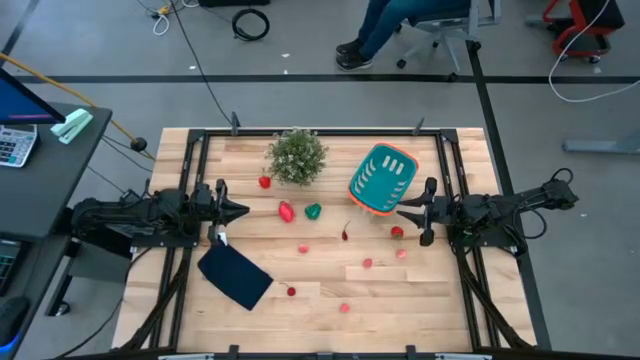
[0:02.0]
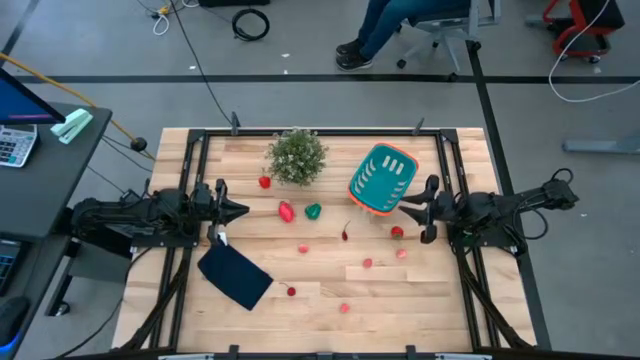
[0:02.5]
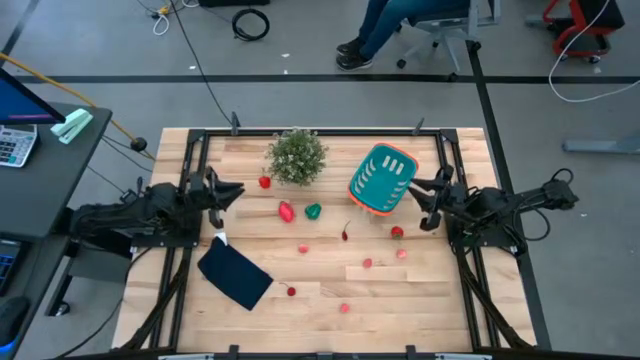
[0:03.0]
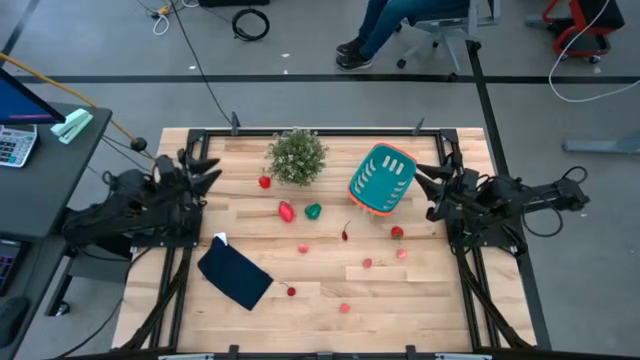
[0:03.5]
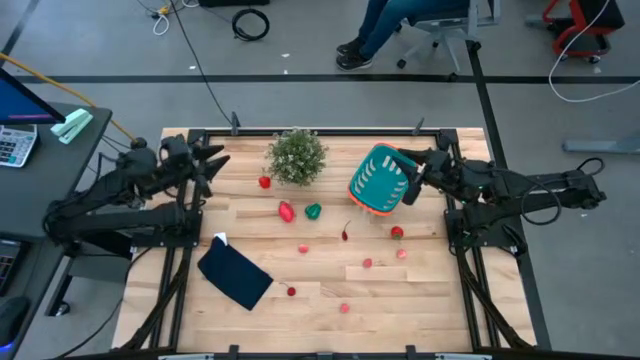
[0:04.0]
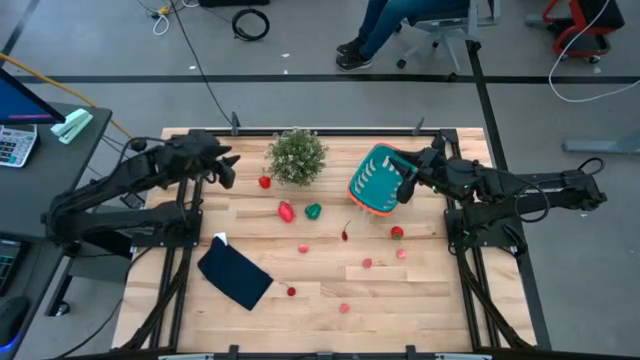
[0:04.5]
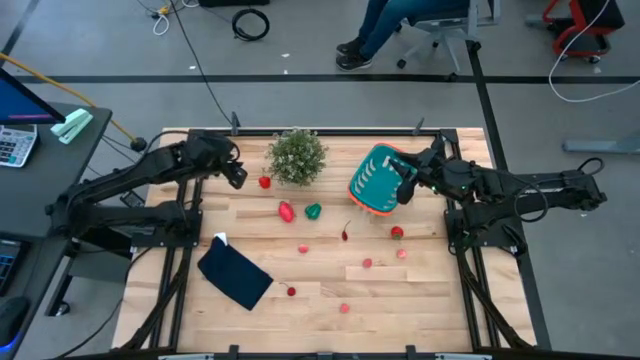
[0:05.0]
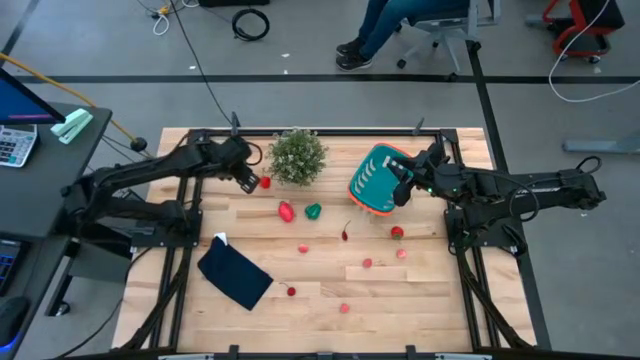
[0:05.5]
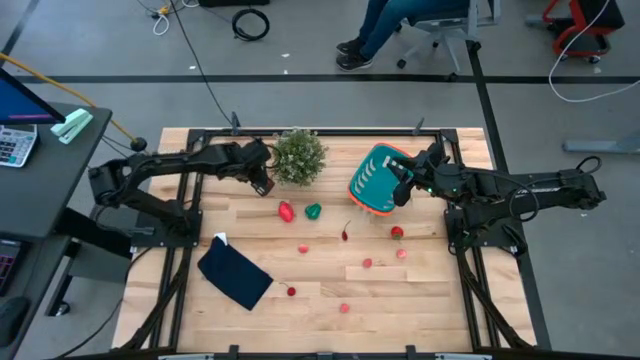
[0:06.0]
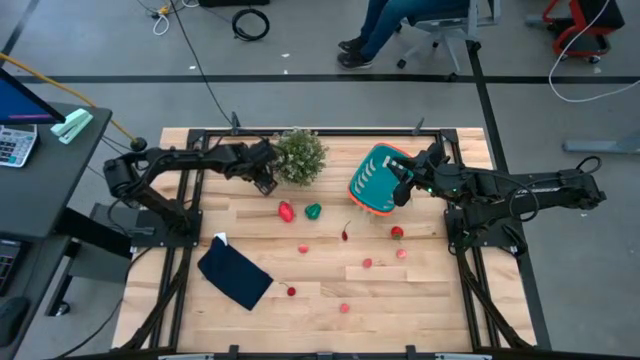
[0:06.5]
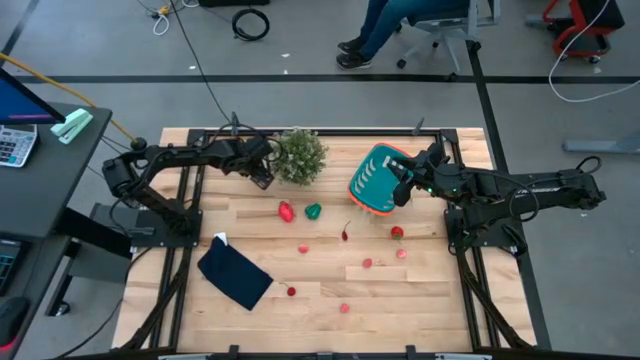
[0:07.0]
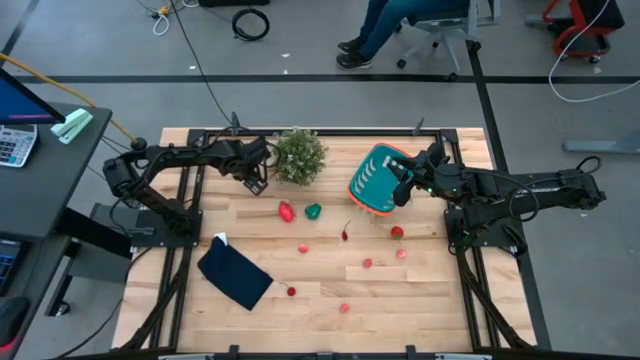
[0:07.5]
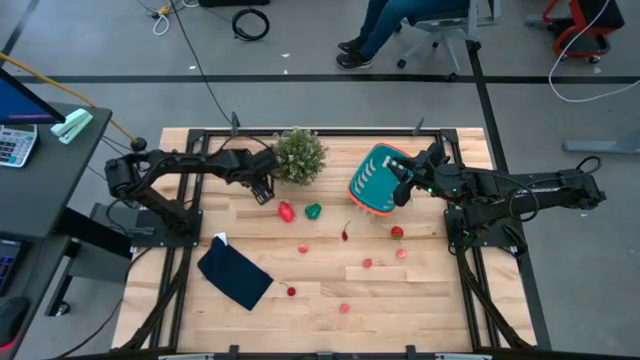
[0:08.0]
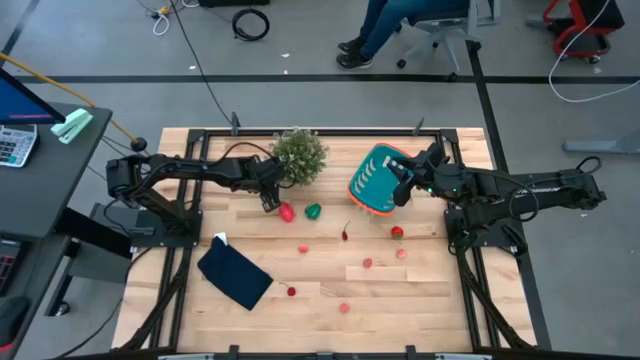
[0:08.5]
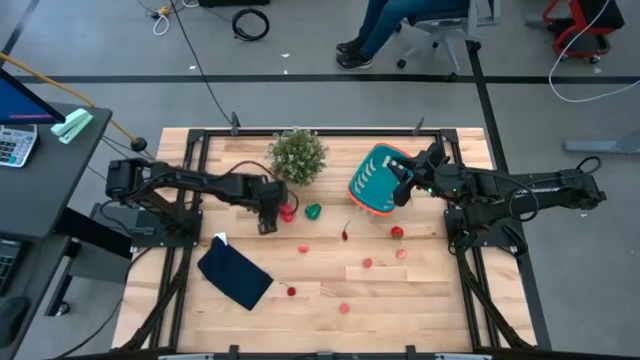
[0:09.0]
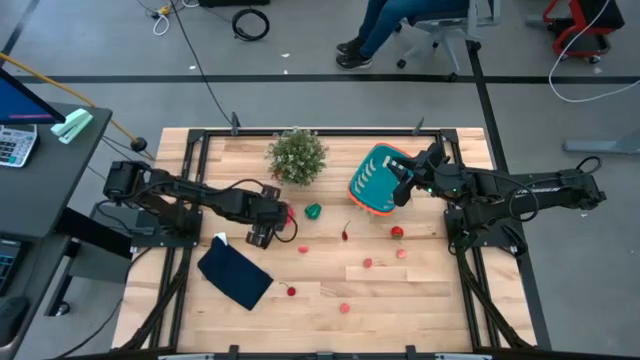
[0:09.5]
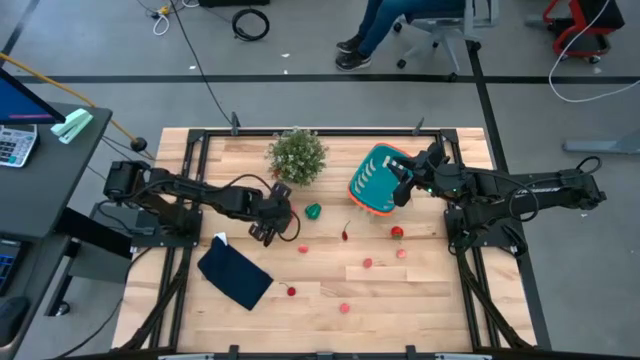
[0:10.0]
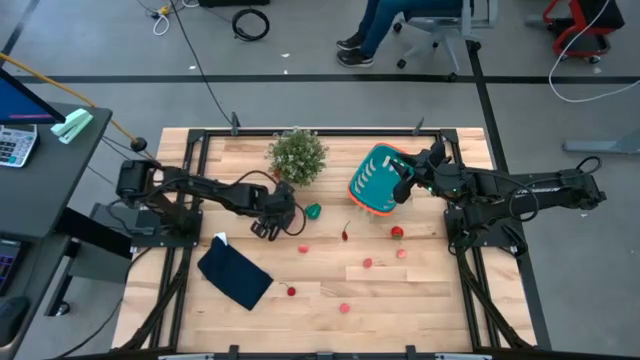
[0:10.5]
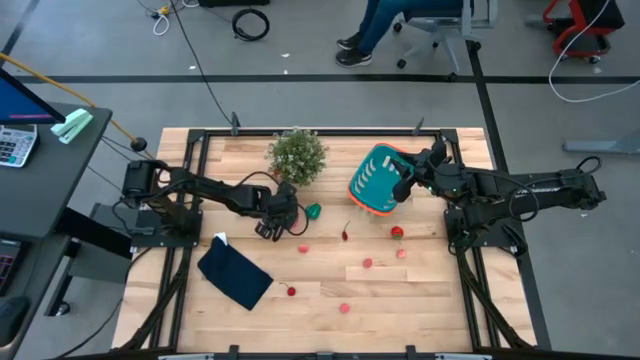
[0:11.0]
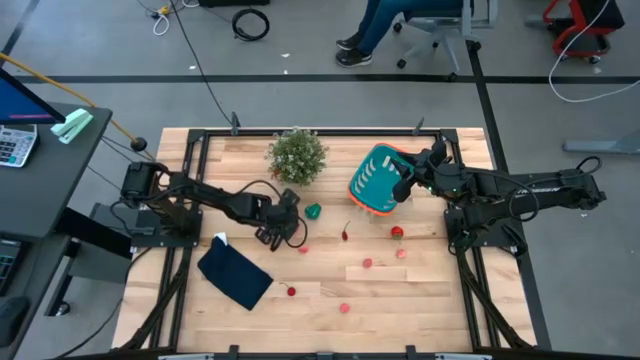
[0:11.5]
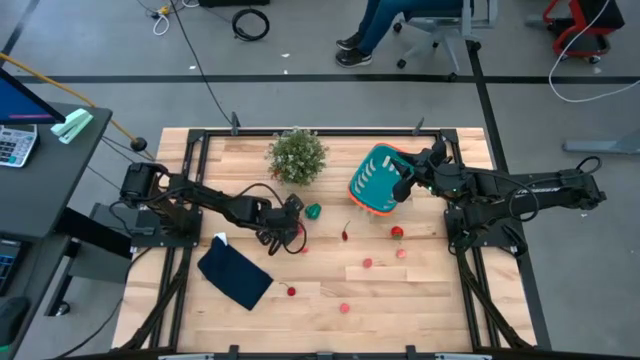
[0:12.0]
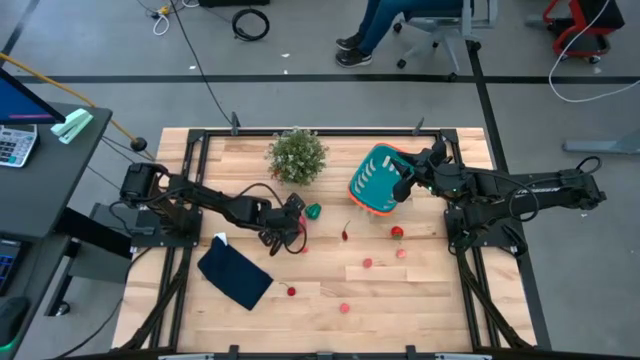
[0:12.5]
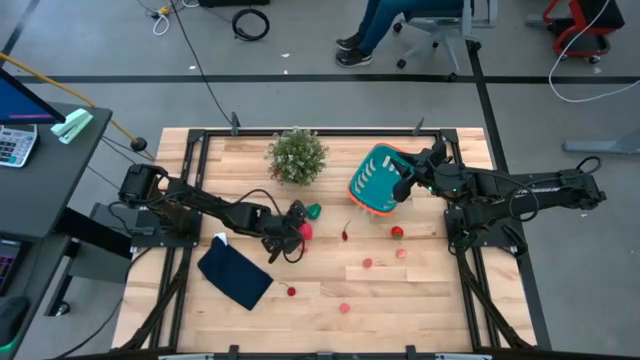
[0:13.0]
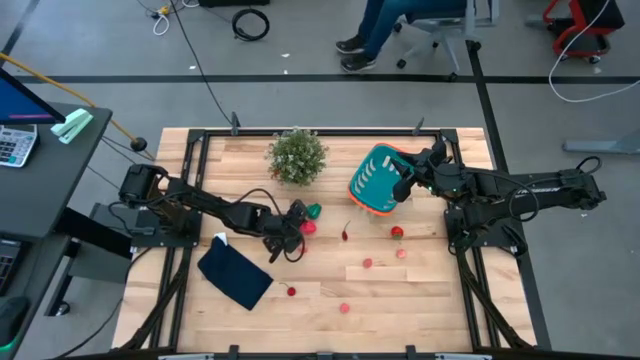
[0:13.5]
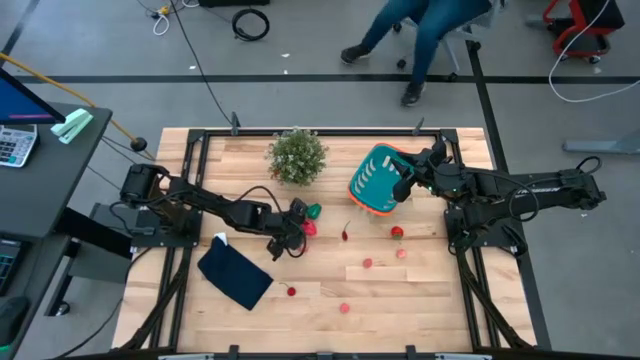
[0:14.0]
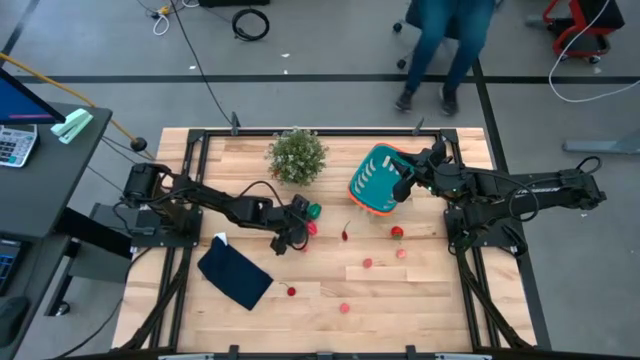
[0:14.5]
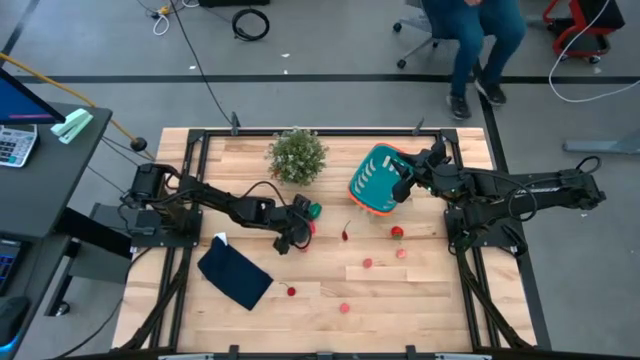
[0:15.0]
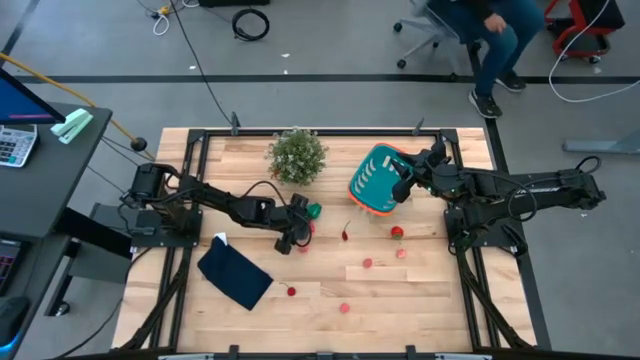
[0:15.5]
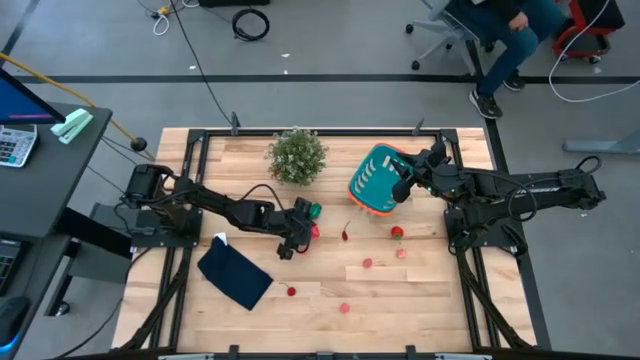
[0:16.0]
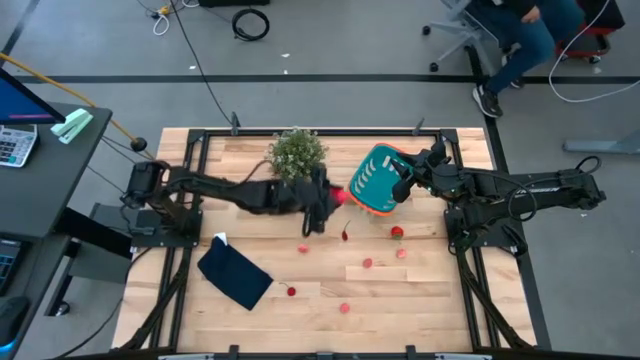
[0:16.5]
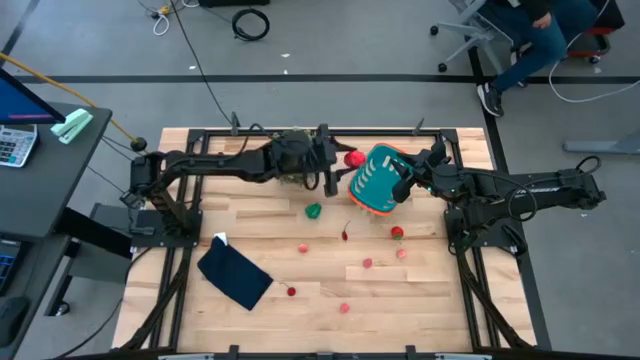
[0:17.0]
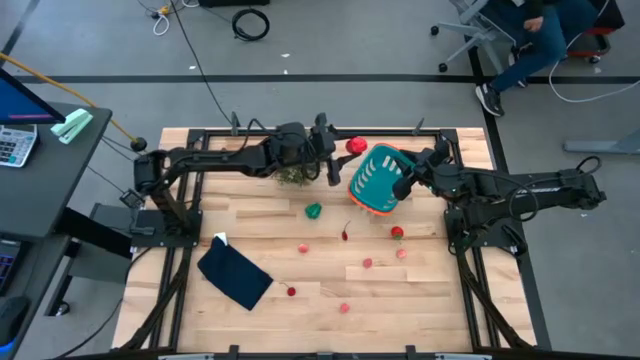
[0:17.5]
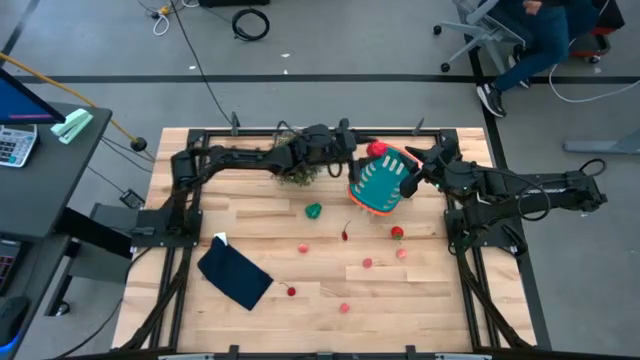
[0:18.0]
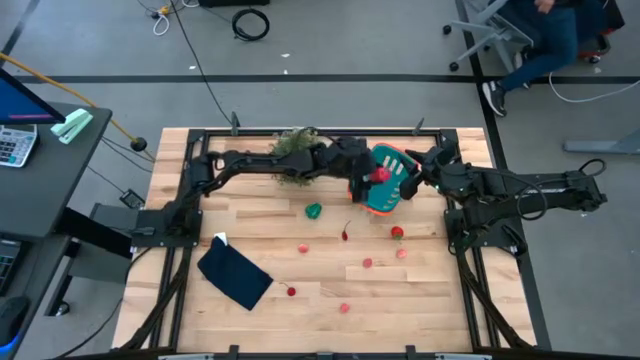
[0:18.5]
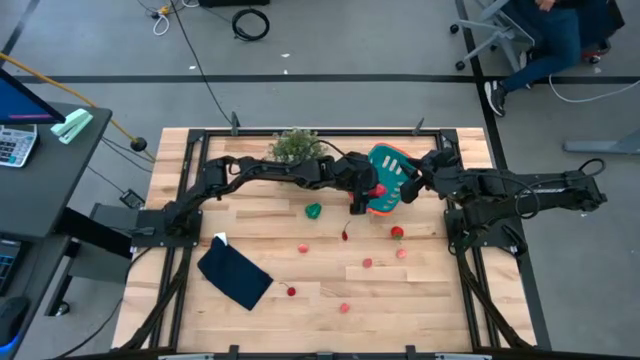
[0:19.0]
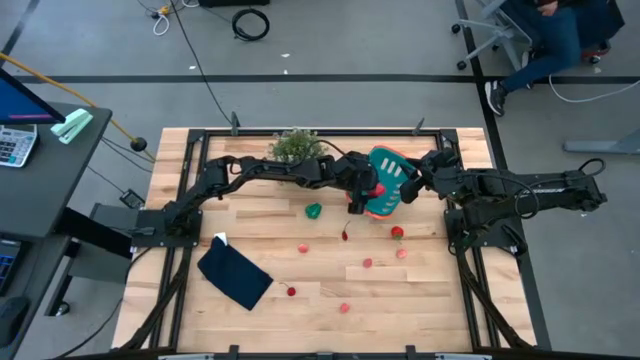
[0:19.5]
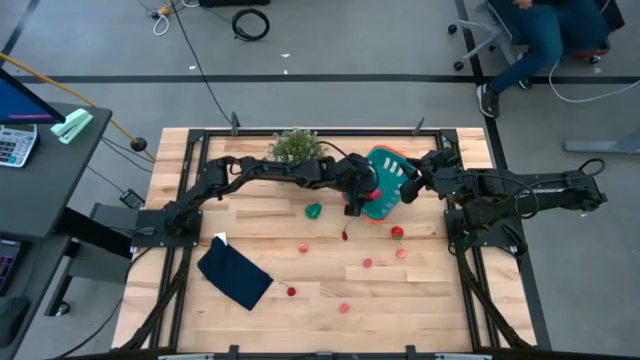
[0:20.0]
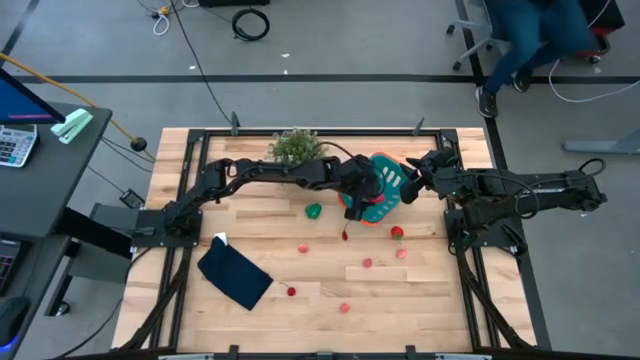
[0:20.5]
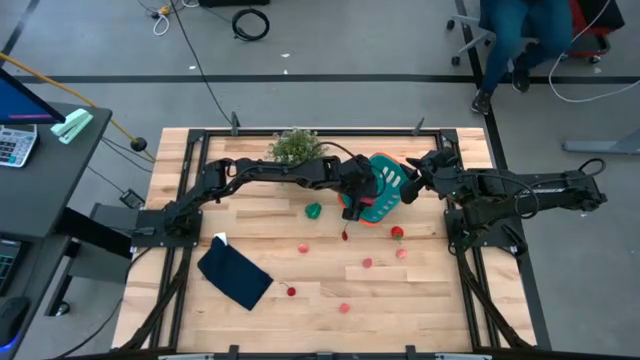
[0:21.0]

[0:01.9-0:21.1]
Task: Pick and placing Produce into tupperware
Put the red dragon fruit into the basket
